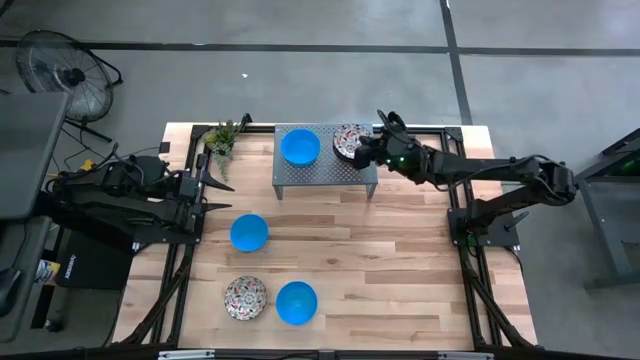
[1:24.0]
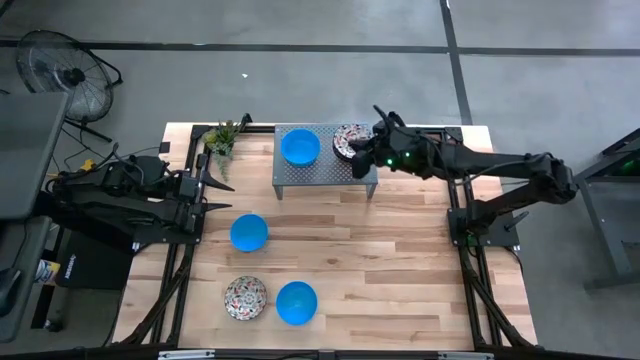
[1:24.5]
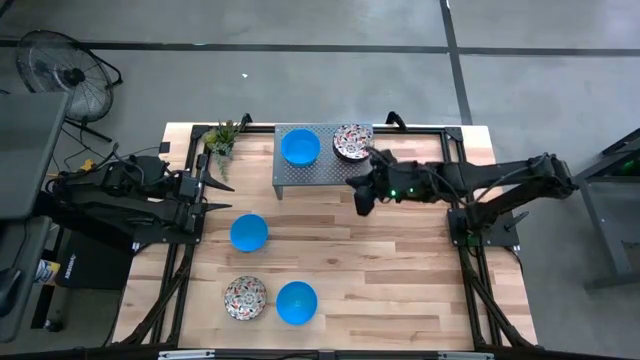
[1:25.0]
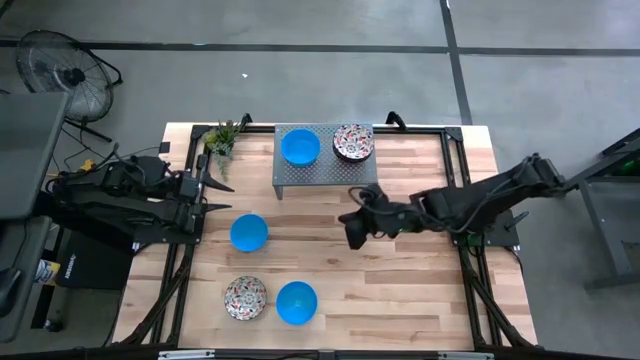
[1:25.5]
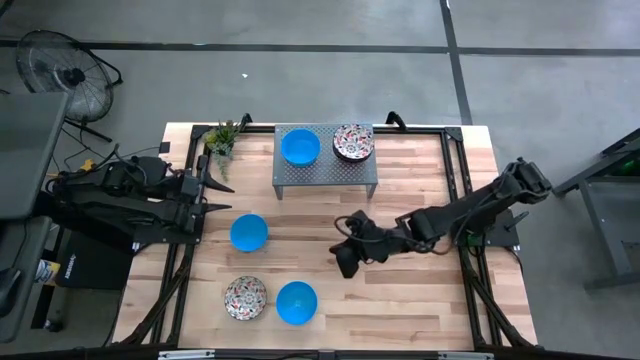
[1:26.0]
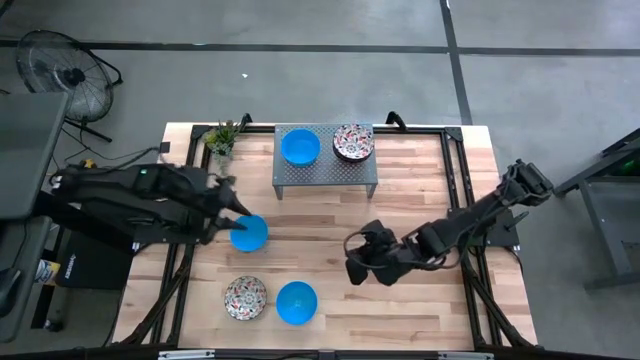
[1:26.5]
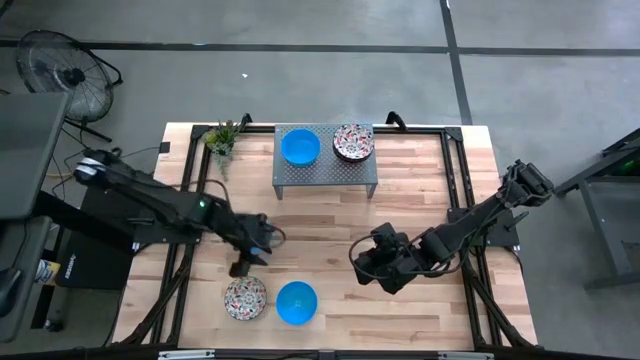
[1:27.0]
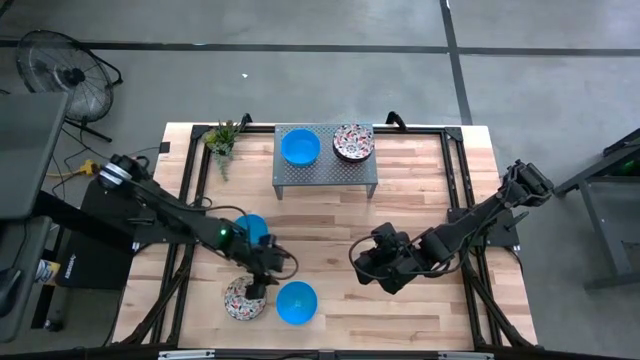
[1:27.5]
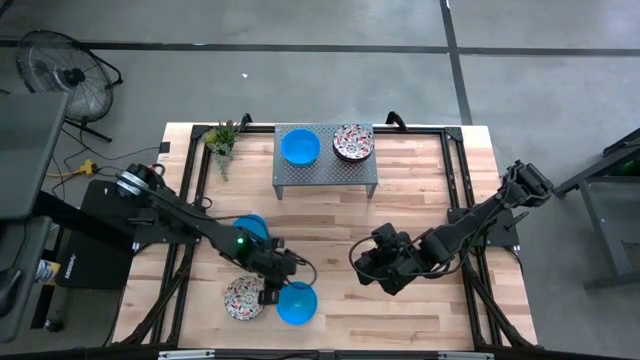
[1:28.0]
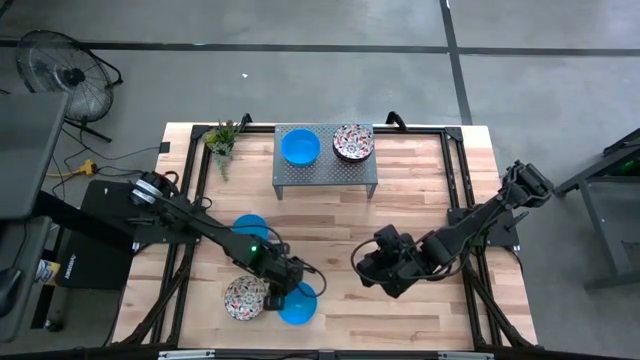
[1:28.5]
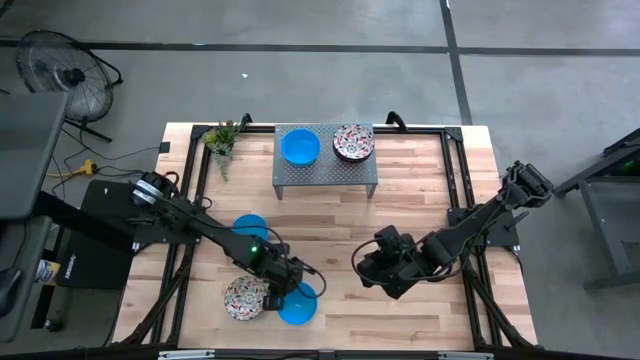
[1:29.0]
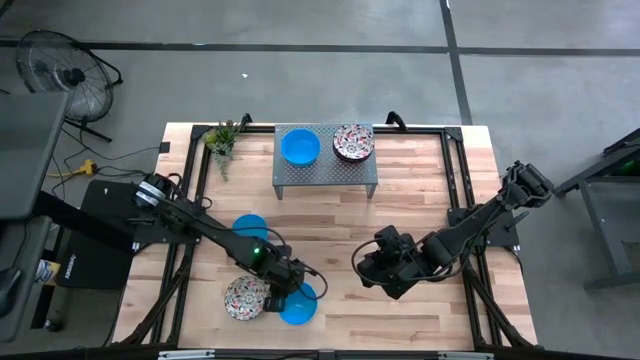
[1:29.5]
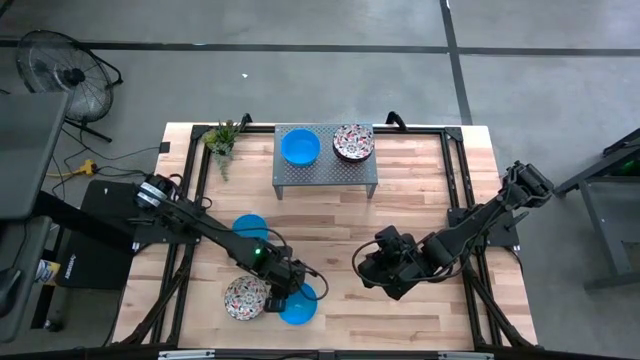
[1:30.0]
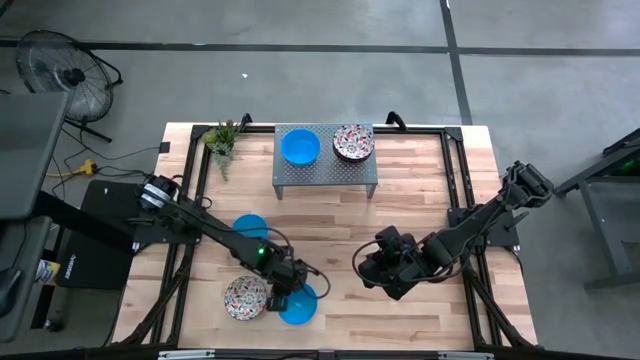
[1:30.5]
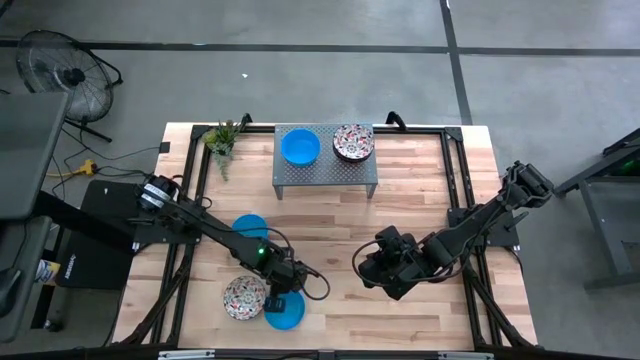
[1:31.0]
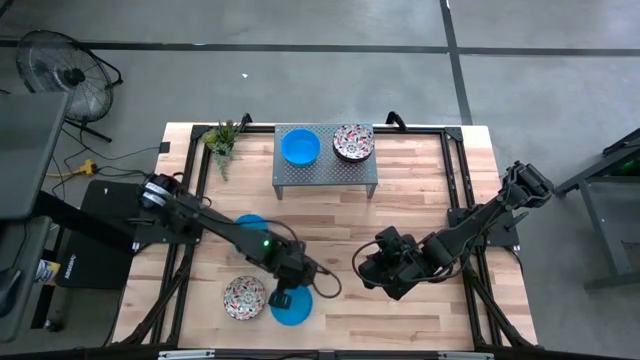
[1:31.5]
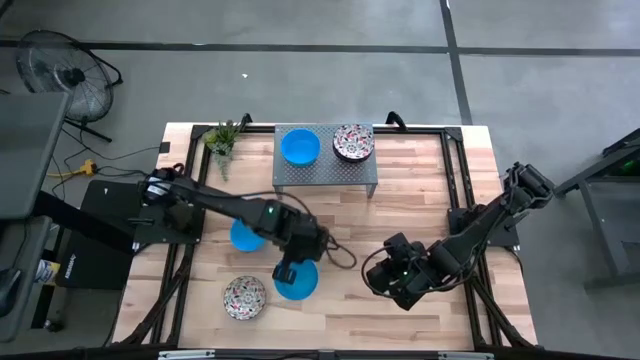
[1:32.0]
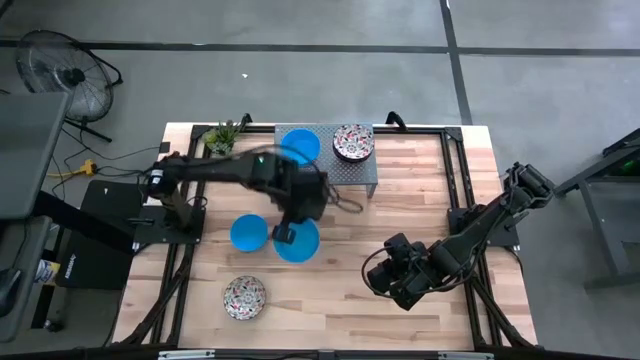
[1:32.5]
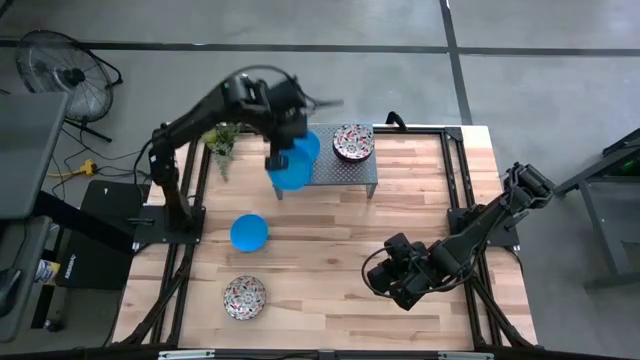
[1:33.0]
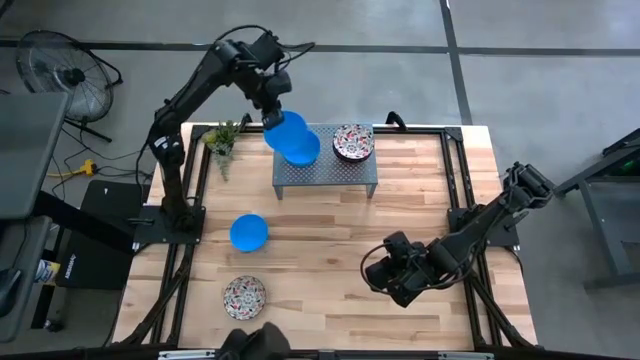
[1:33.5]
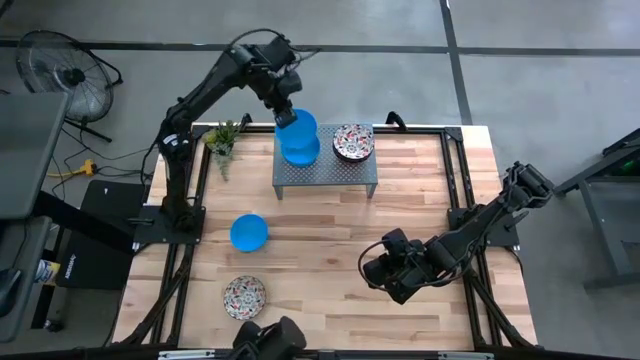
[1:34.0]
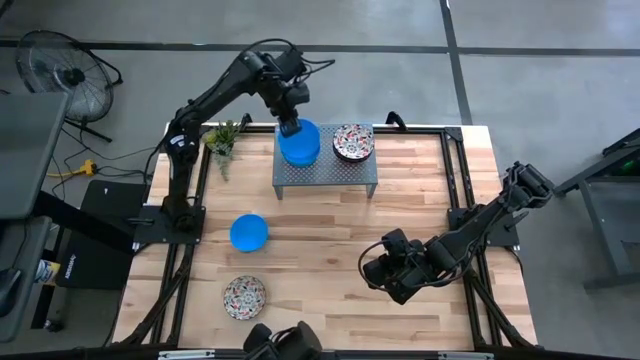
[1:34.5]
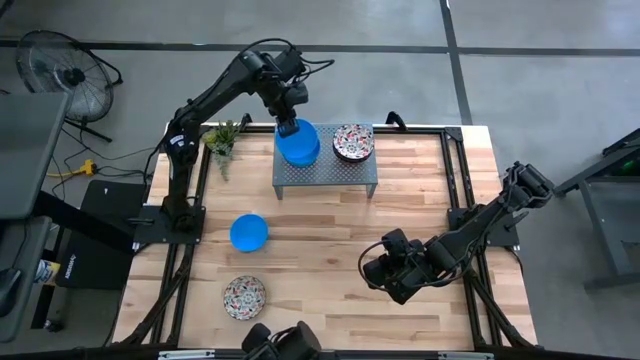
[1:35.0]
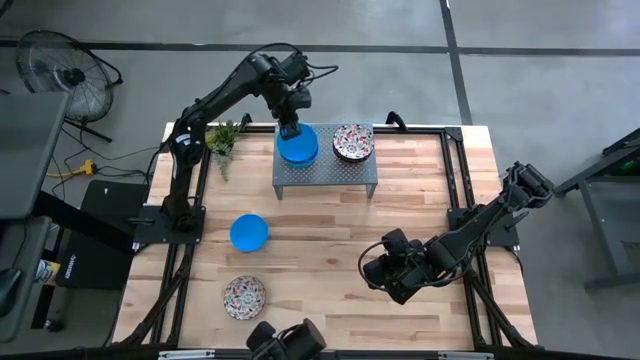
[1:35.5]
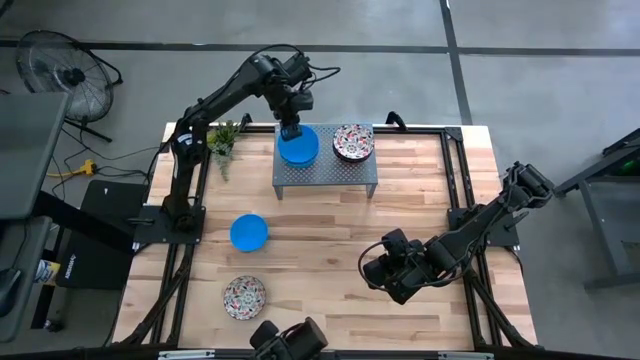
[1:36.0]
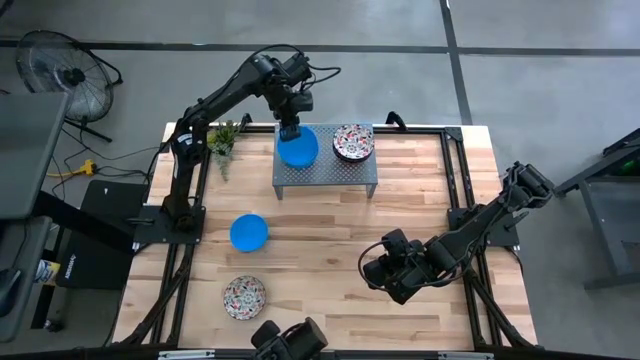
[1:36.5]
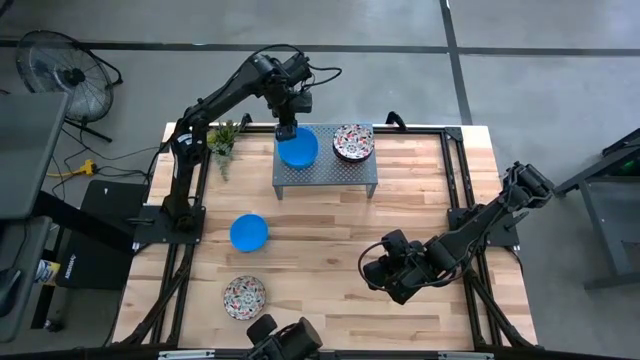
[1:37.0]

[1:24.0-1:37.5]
Task: Pick & Place Mini bowls
Stack the blue bowl on top of the other blue bowls on the shelf

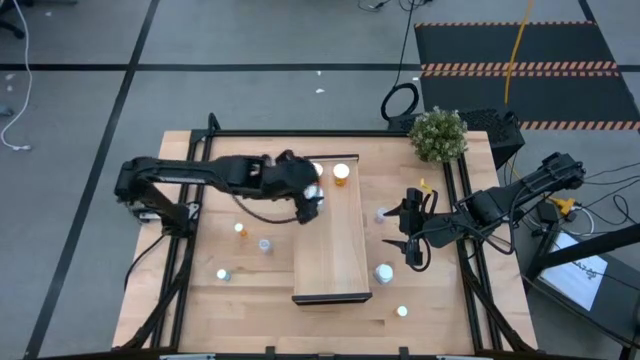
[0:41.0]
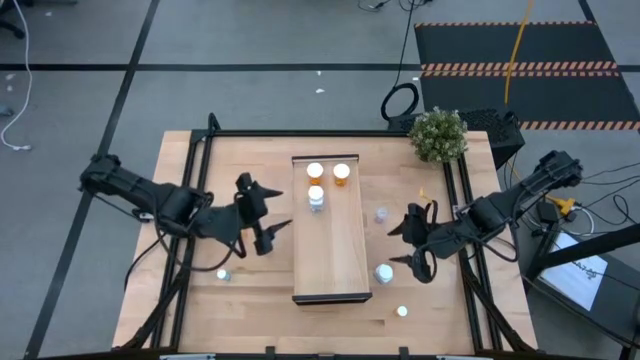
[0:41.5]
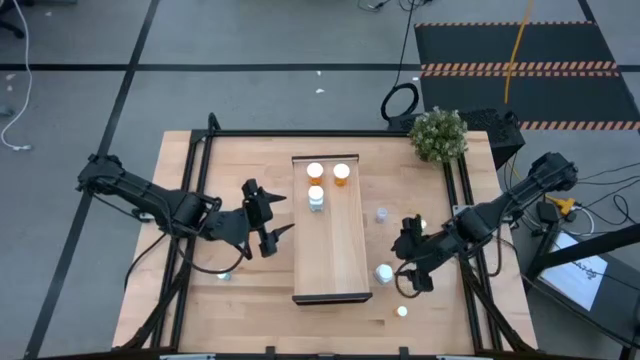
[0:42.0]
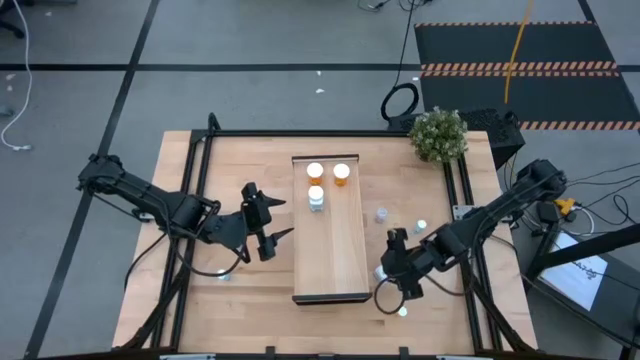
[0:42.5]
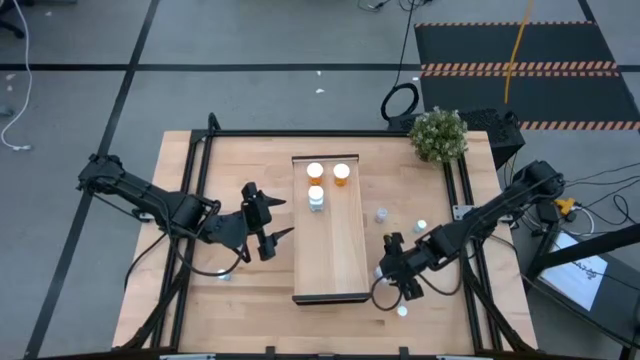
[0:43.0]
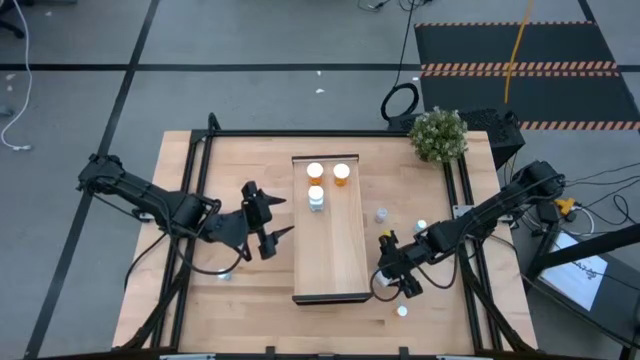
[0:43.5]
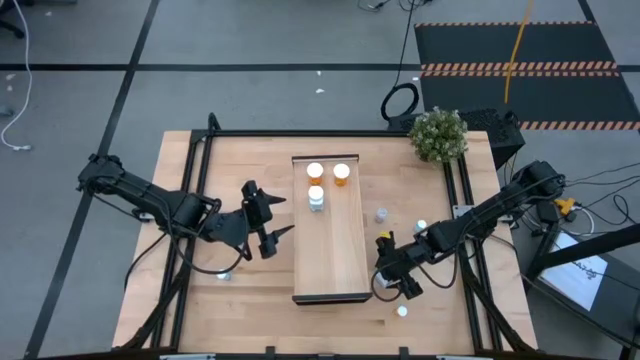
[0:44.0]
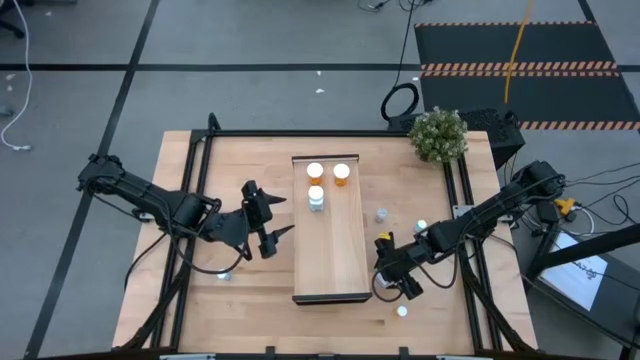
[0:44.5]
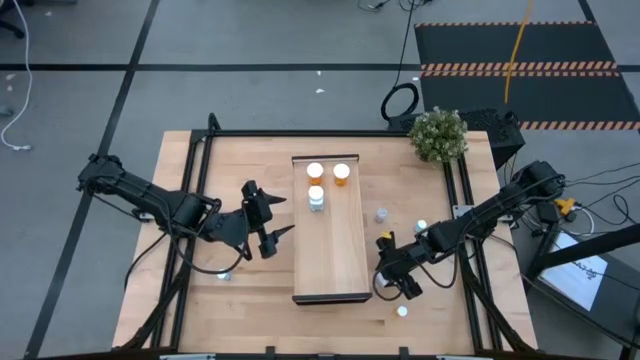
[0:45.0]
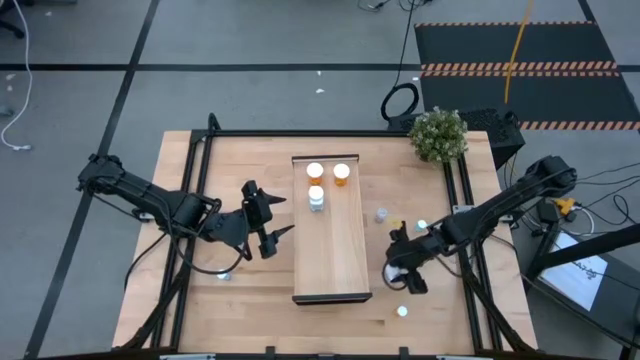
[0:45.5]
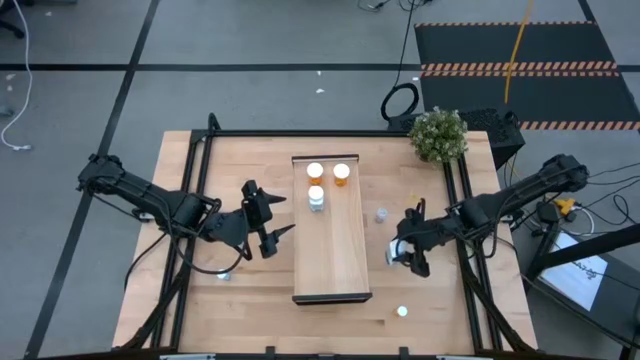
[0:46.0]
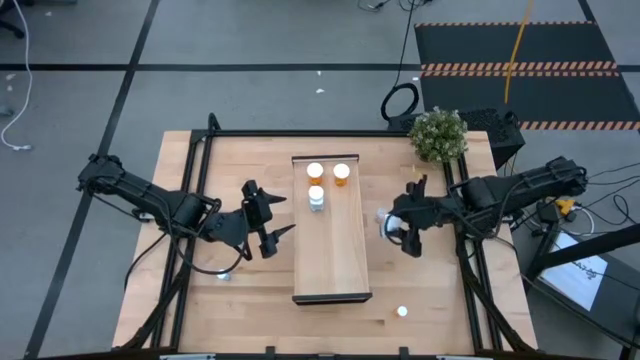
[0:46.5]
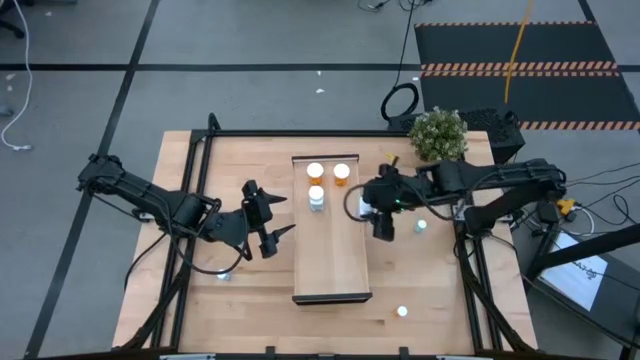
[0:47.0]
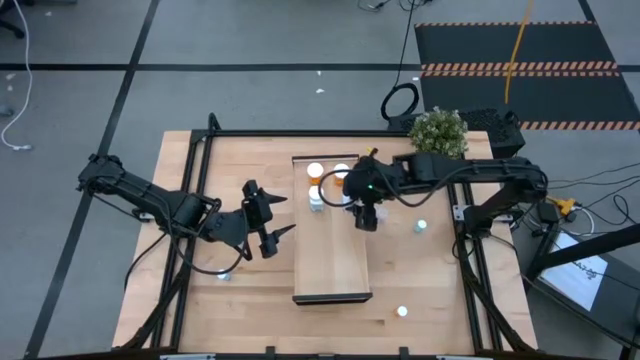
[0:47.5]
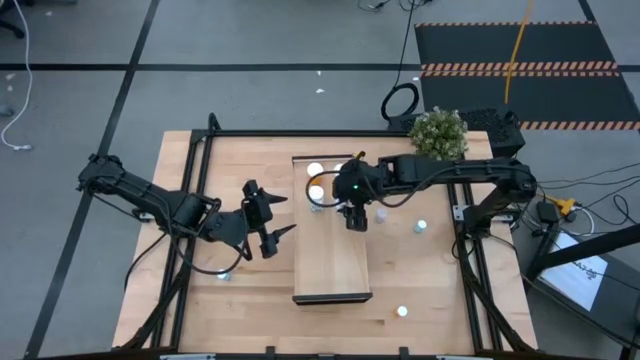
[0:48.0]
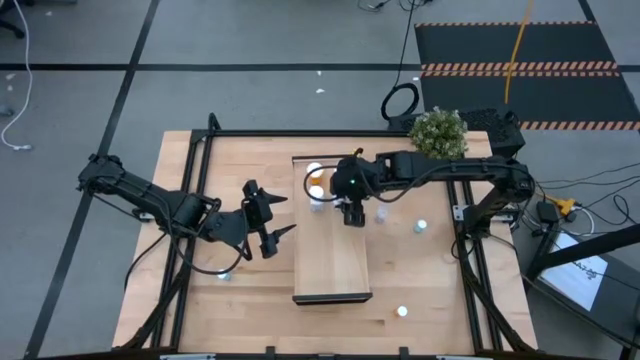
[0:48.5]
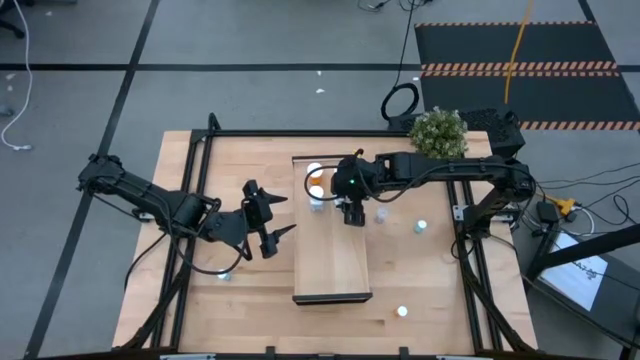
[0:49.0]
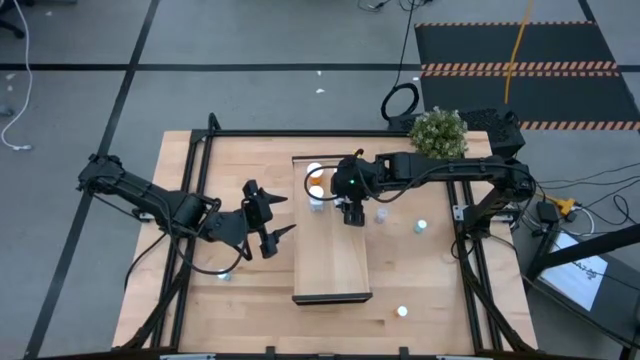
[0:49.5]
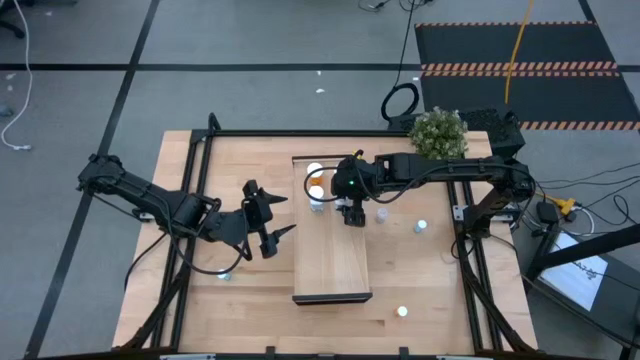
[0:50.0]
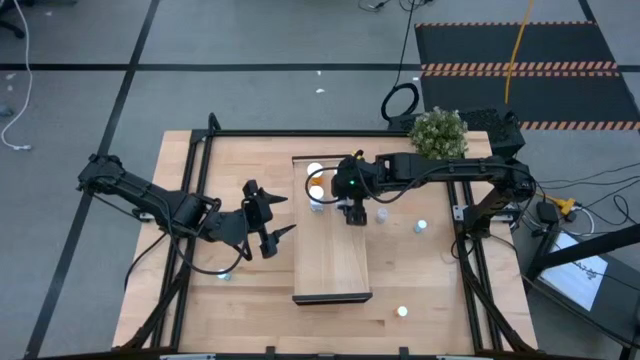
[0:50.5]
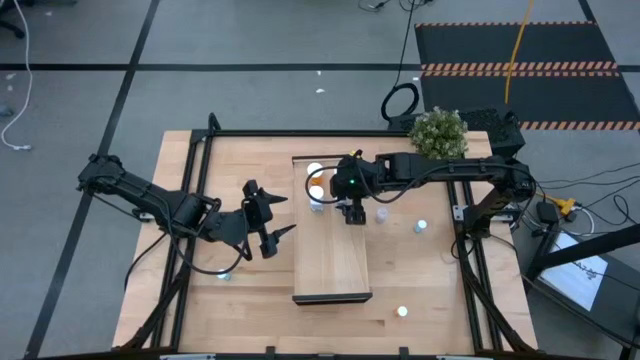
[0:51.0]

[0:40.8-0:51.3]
Task: Pick and place medicine bottles onto shelf by color
Put the white medicine bottle on the shelf aligned with the other white medicine bottle
